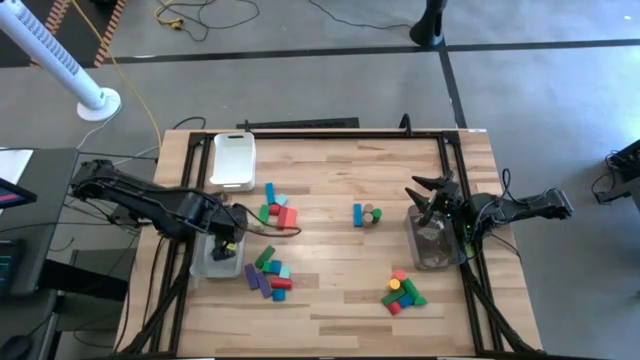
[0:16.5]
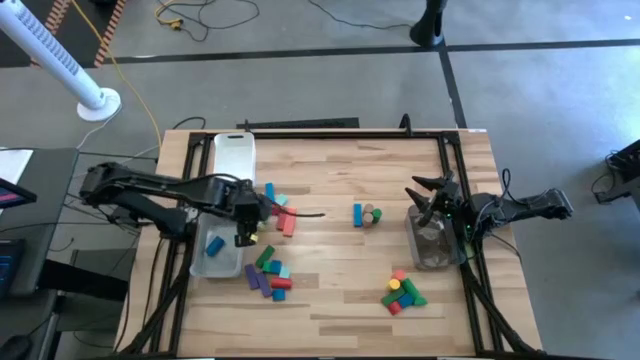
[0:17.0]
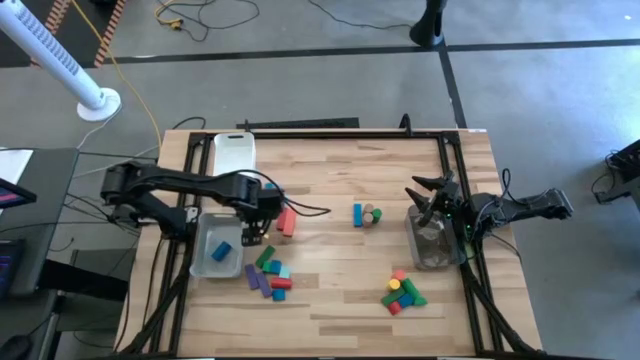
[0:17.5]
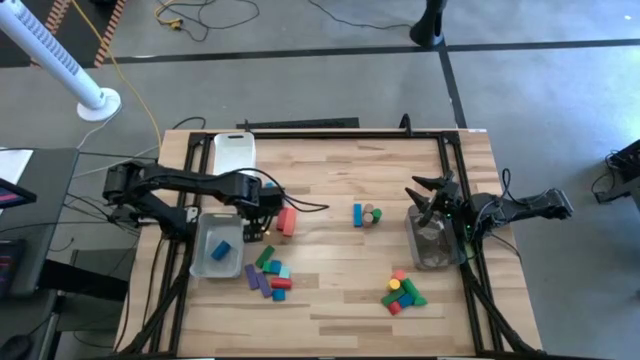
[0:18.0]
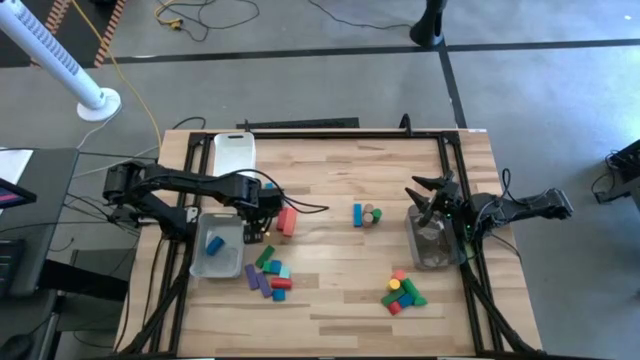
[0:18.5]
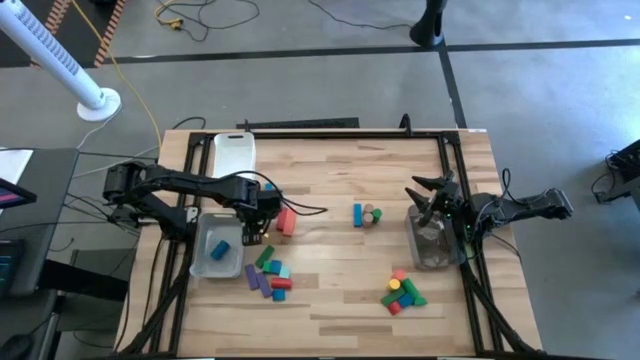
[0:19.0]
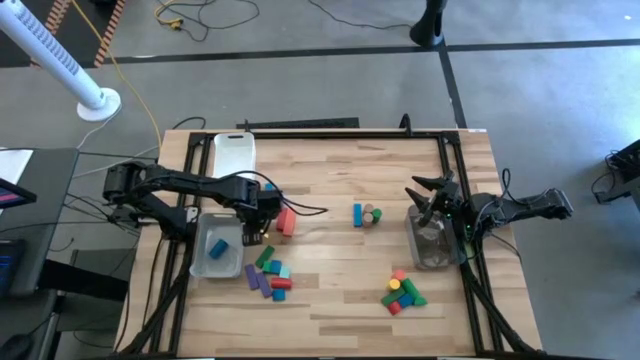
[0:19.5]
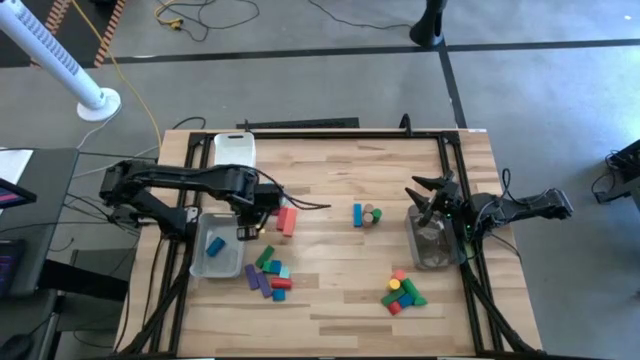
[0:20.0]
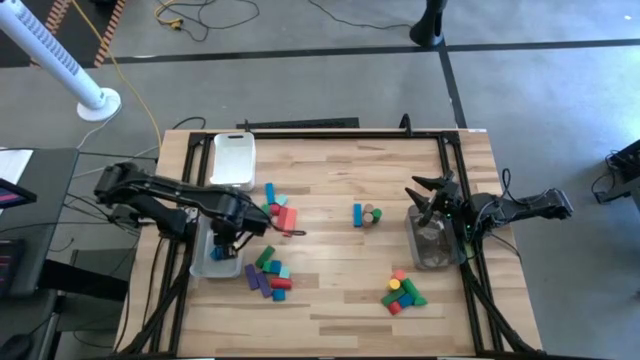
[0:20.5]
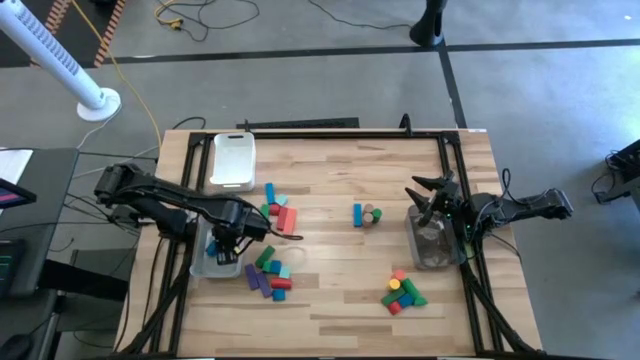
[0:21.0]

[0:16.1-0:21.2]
Task: Sort blocks by size
Put the light green cylindrical block into the gray bin

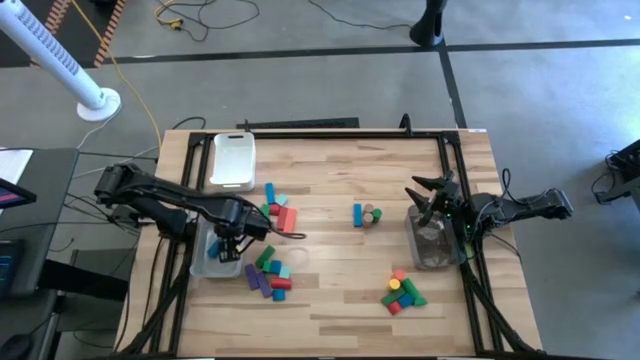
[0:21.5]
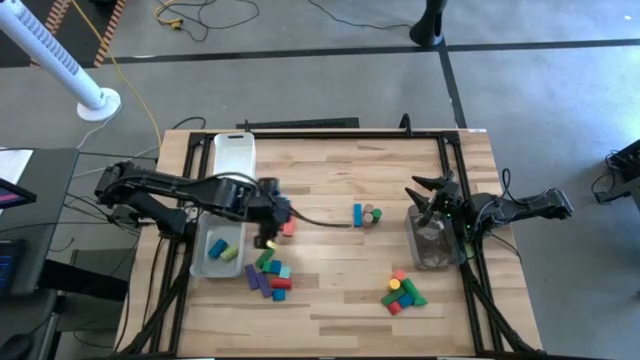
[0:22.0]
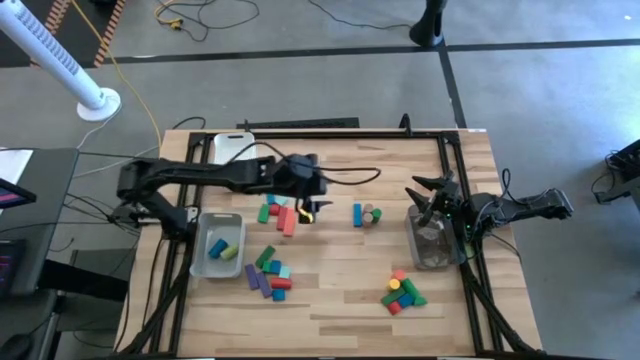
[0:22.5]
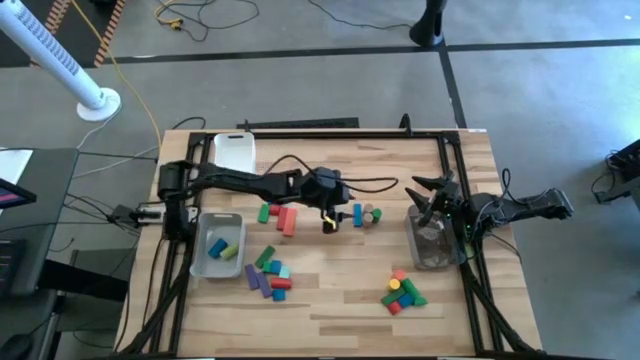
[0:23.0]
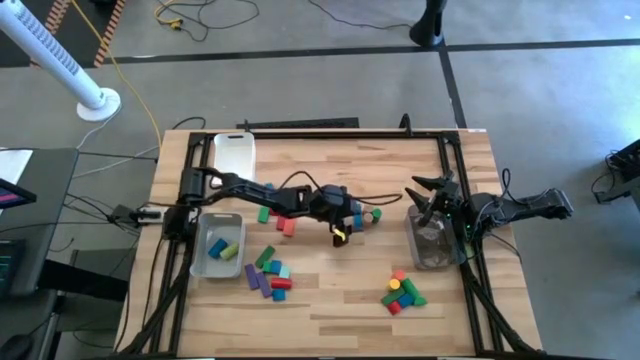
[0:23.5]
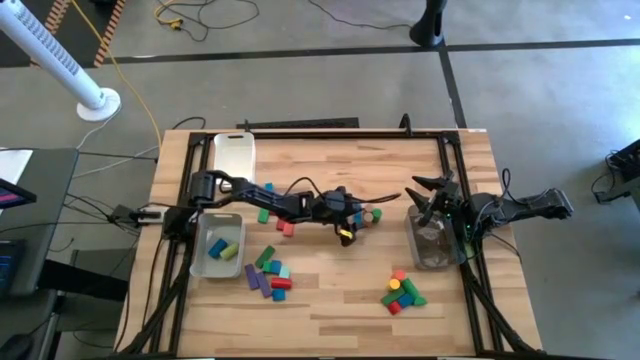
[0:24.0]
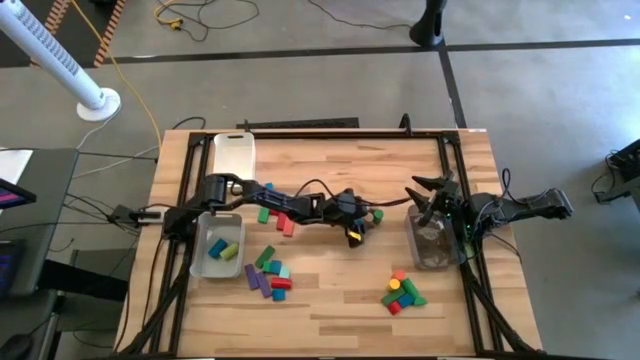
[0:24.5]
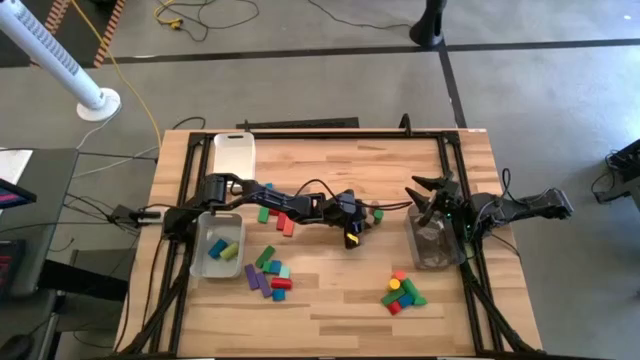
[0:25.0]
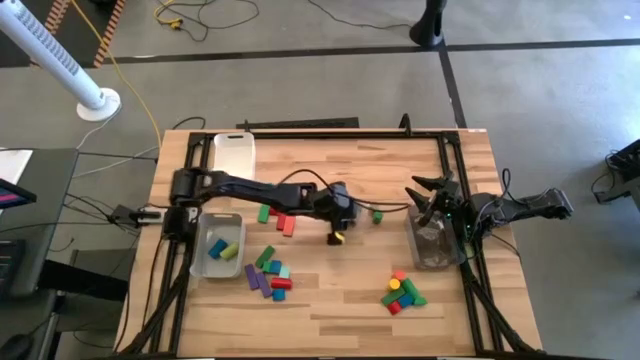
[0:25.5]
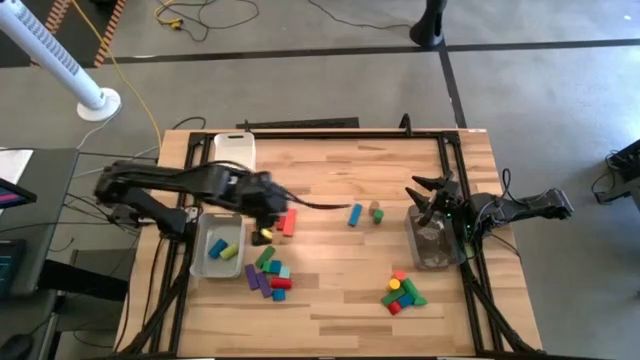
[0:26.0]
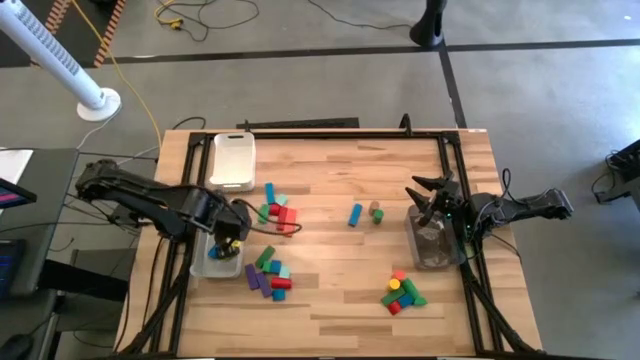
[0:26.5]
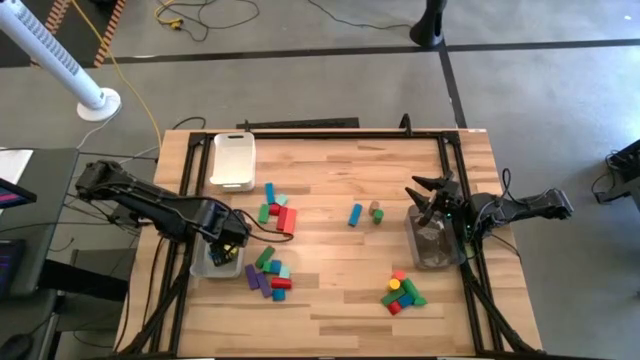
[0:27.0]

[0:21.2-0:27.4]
Put the brown cylindrical block into the gray bin

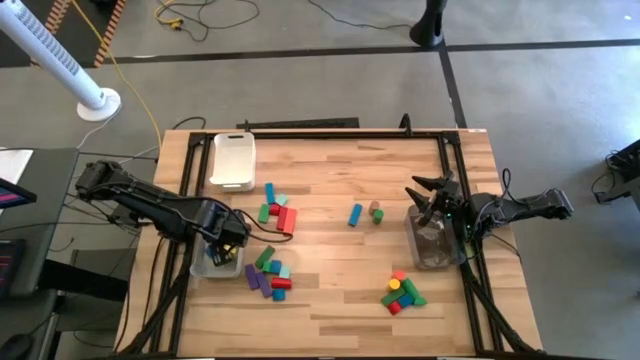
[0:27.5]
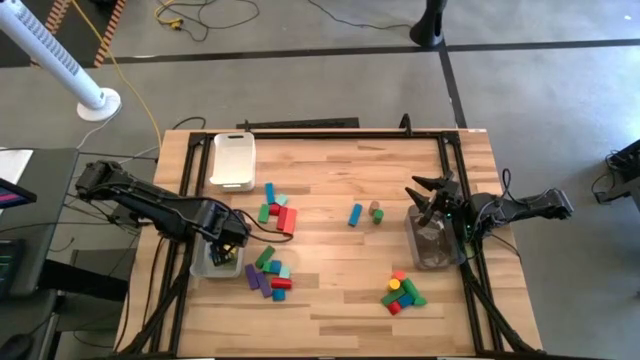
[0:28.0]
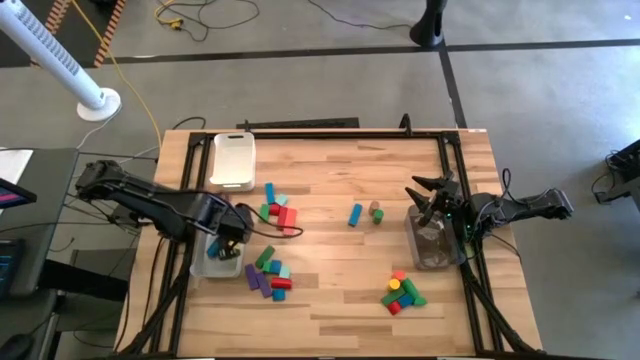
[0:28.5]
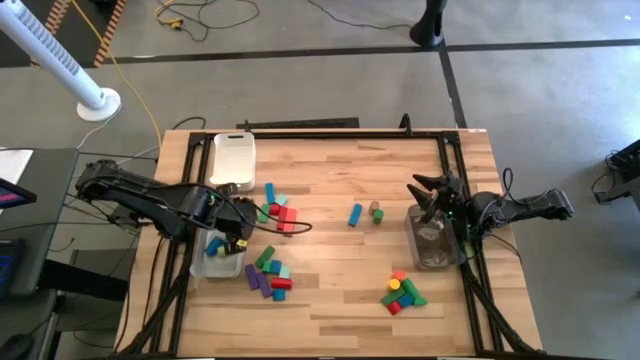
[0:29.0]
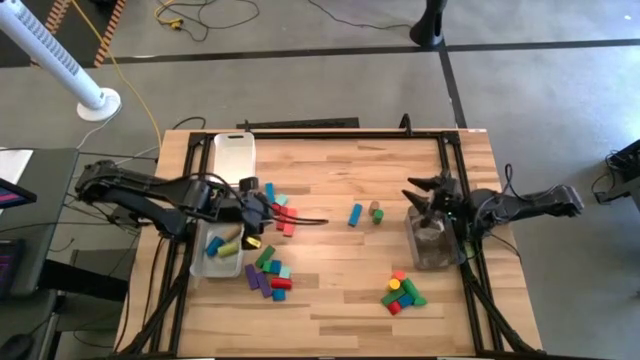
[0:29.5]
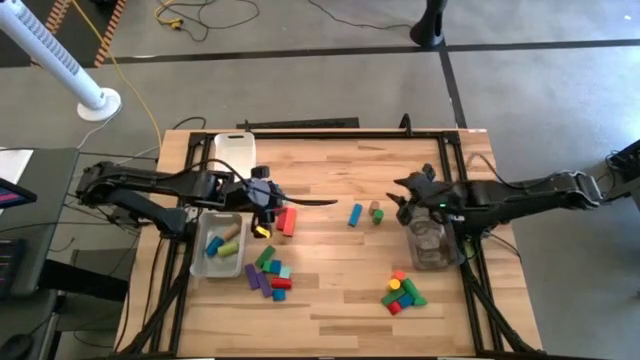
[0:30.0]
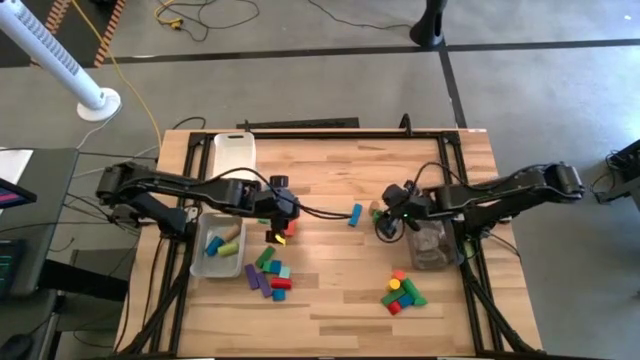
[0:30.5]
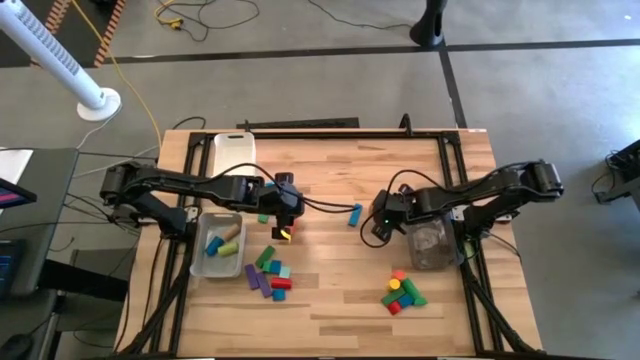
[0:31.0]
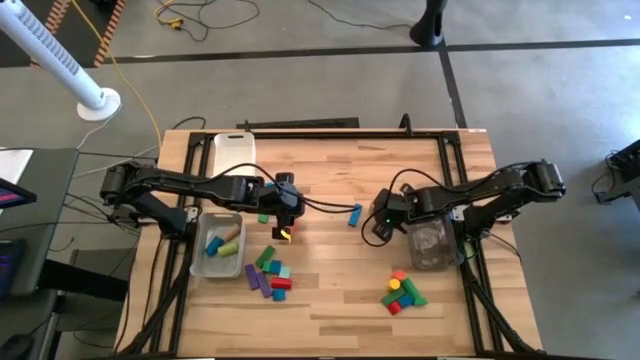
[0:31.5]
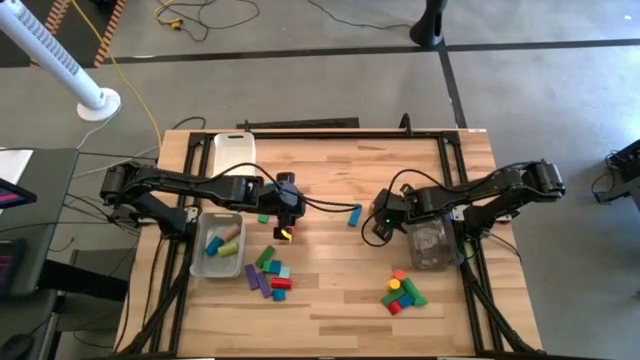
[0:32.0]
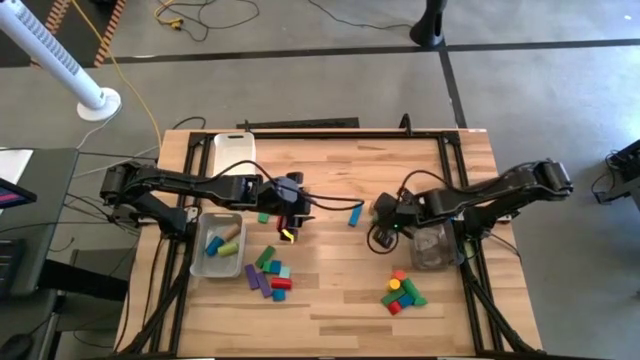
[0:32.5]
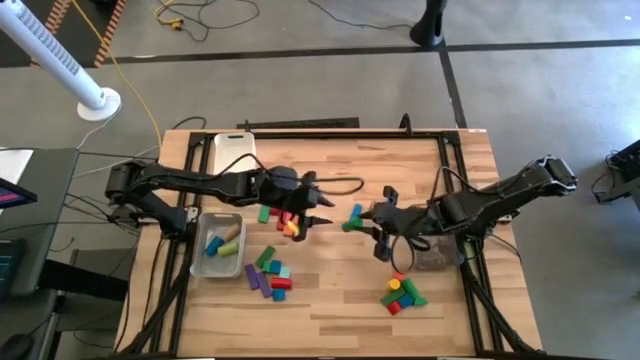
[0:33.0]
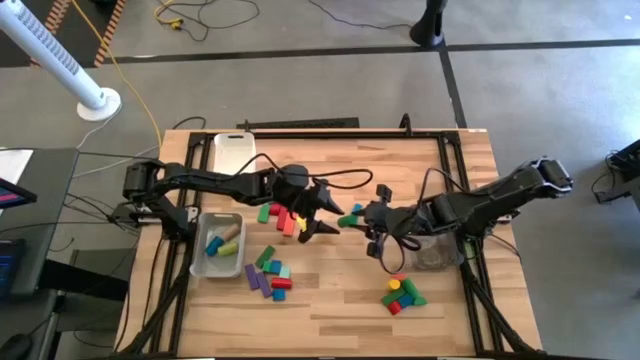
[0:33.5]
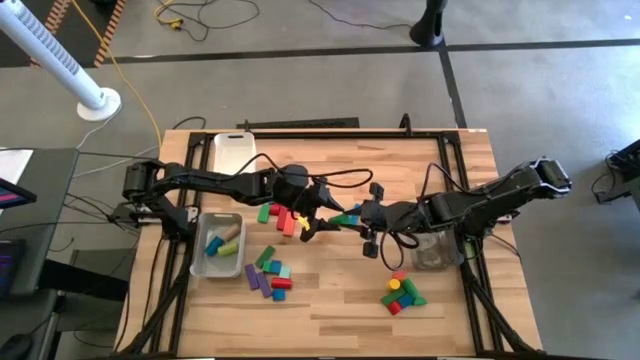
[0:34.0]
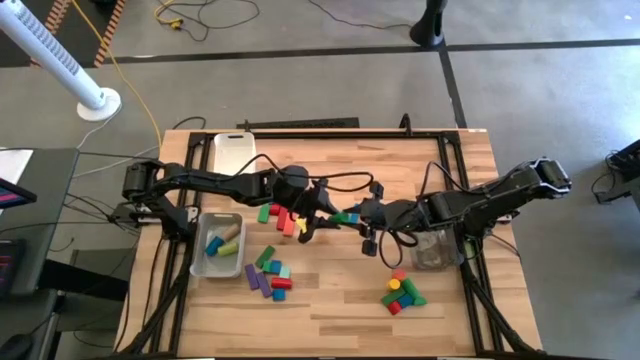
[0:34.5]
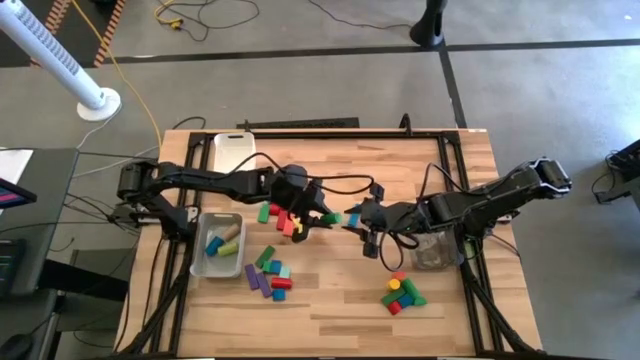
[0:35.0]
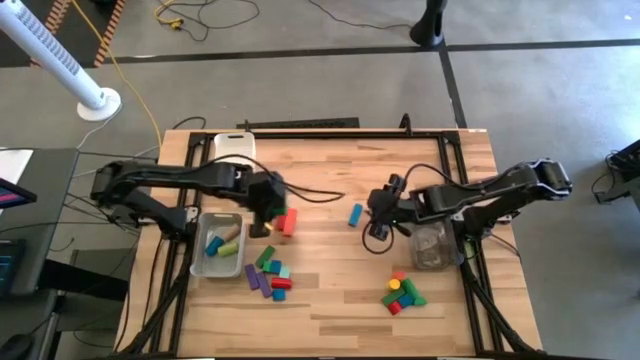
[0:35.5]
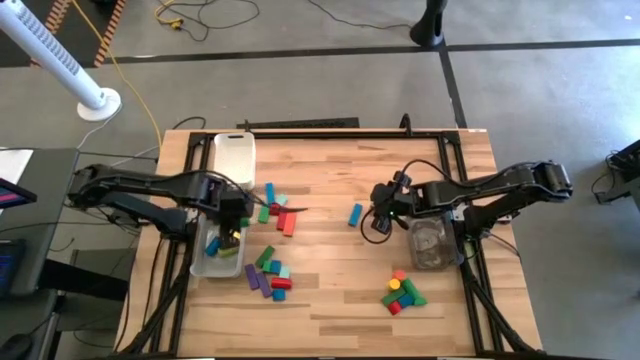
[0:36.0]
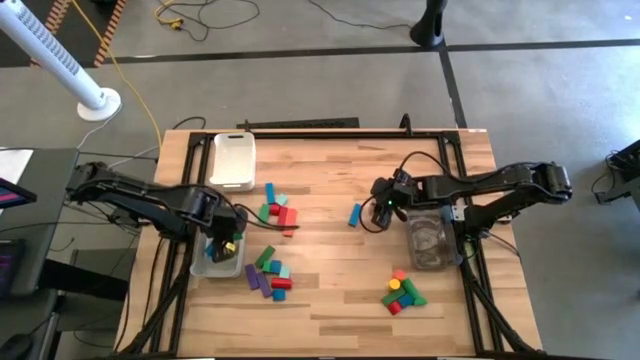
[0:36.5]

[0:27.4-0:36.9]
Put the dark green cylindrical block into the gray bin
